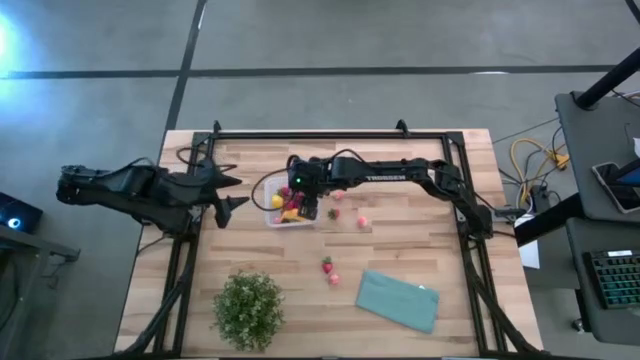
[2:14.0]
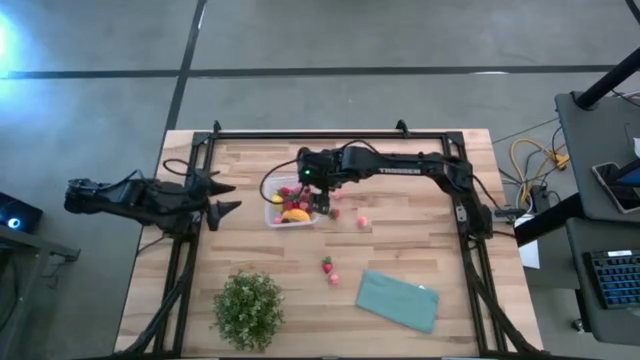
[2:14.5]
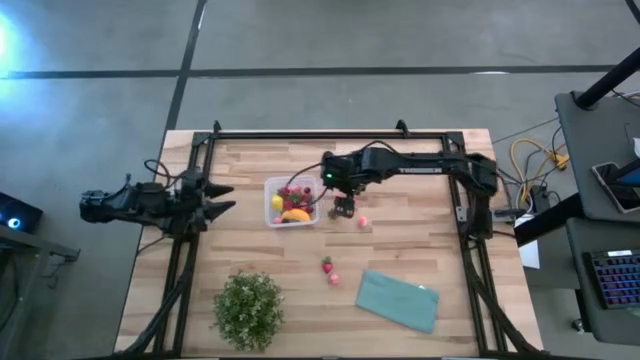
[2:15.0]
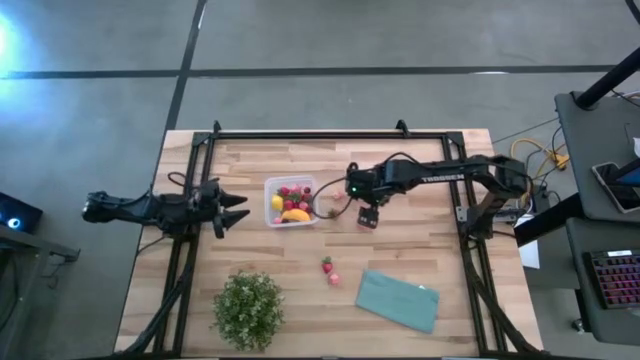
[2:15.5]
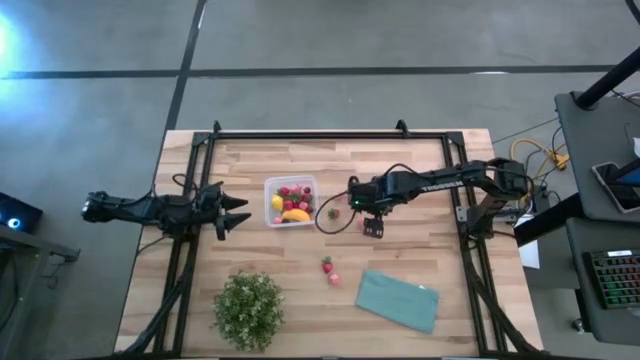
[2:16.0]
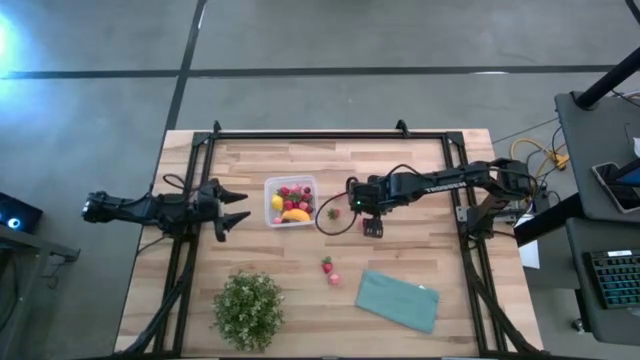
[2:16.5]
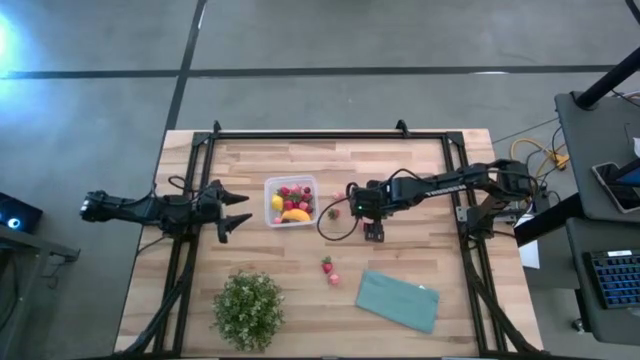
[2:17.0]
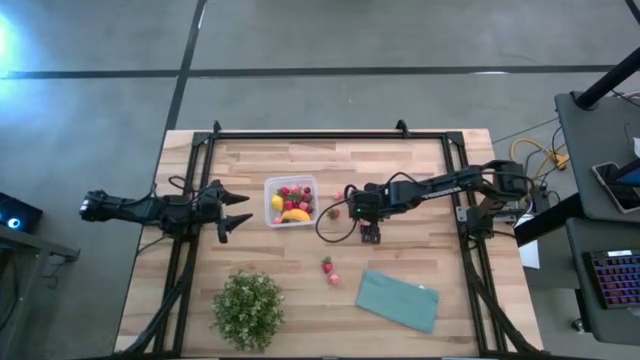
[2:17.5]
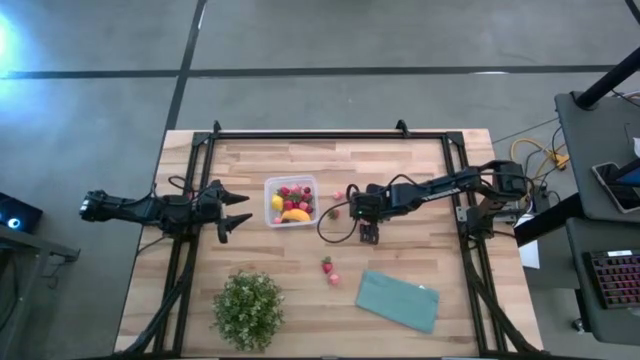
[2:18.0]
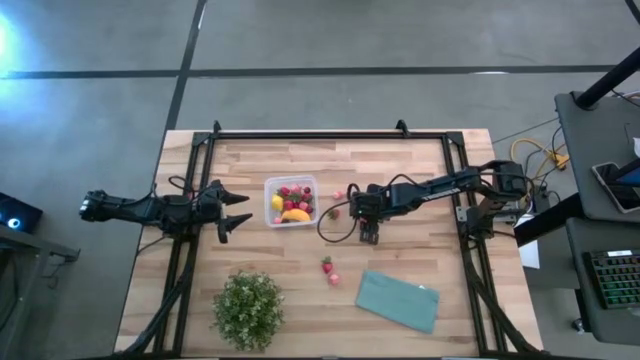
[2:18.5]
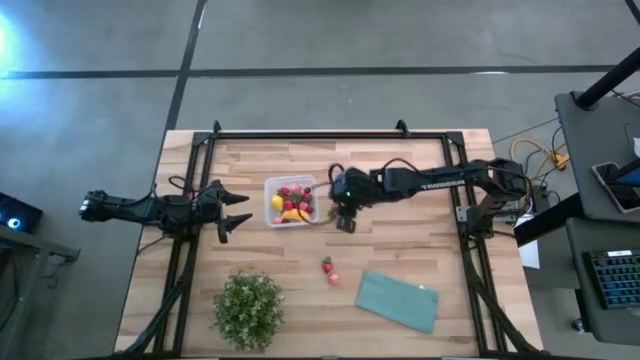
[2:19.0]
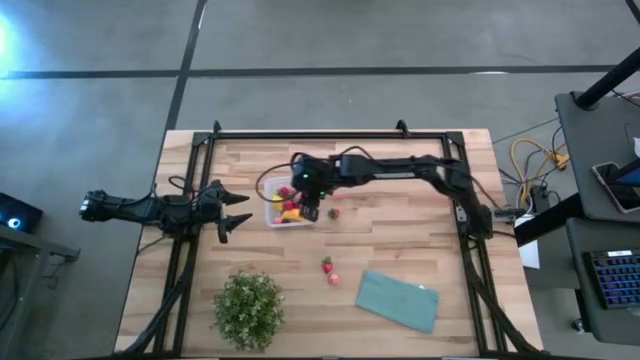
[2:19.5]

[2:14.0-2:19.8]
Task: Pick and placing Produce into tupperware
Put the pink peach into the transparent bin

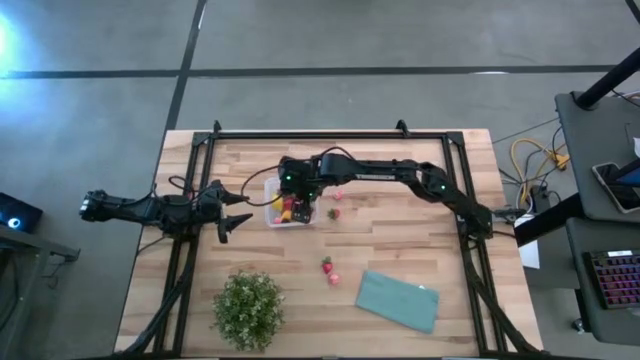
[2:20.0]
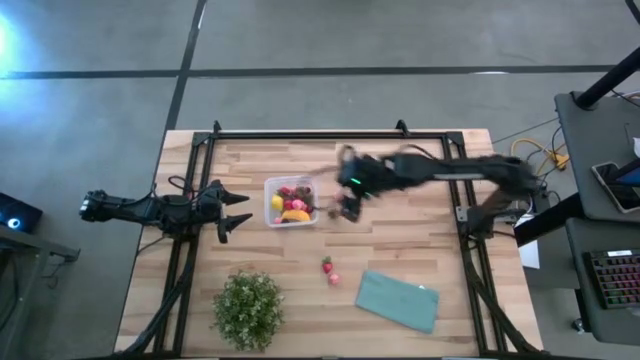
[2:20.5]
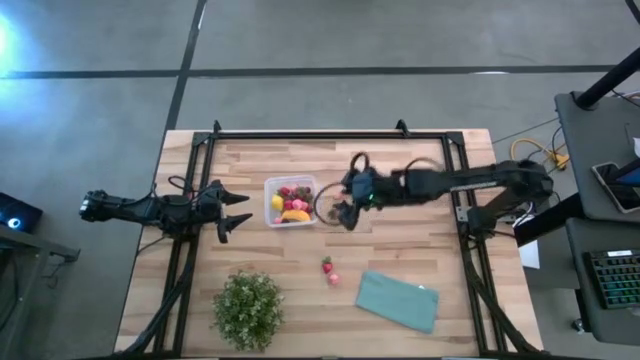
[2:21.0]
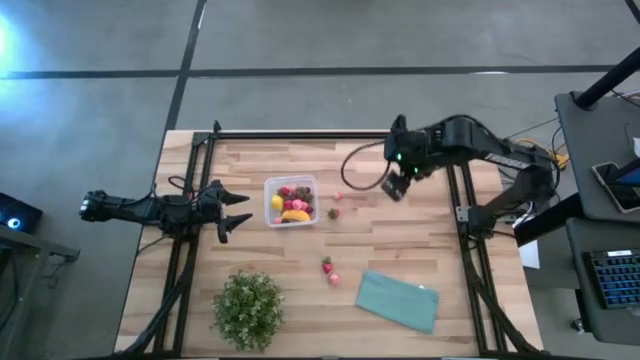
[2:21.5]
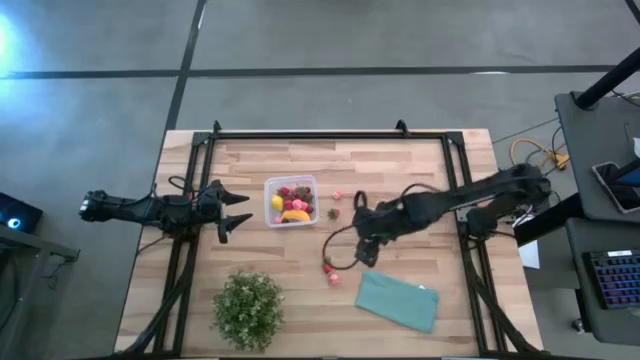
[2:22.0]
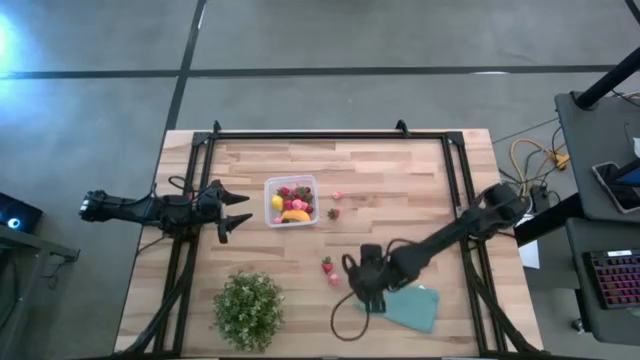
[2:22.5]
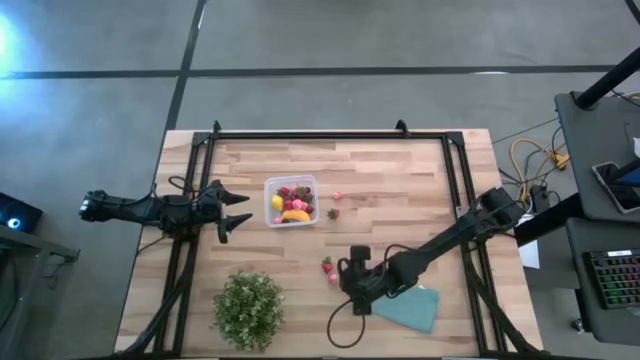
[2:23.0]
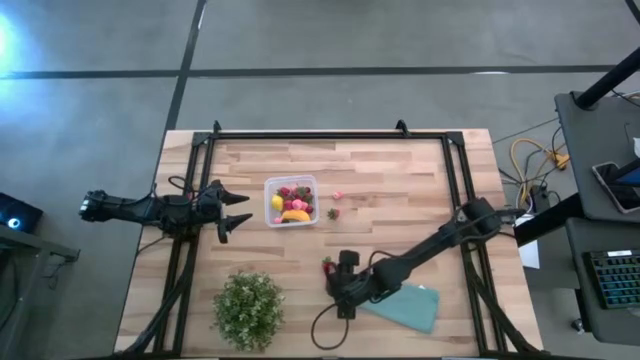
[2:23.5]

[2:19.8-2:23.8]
Put the pink peach into the transparent bin

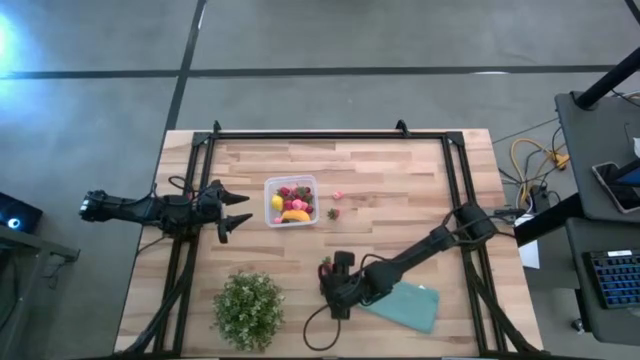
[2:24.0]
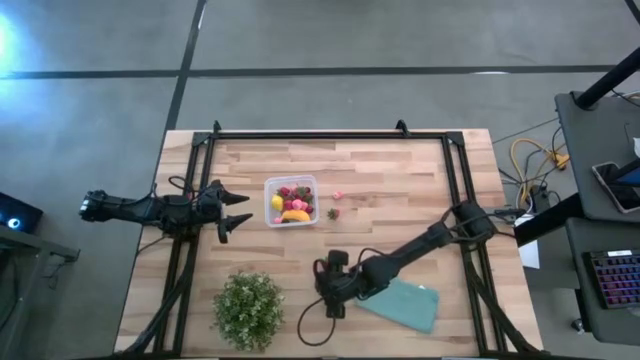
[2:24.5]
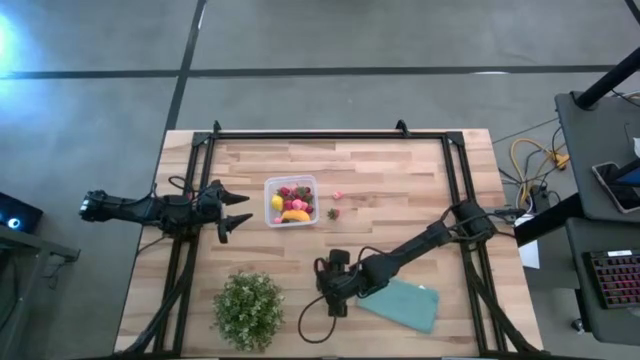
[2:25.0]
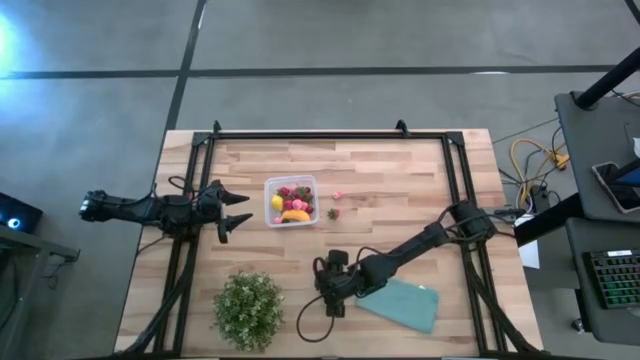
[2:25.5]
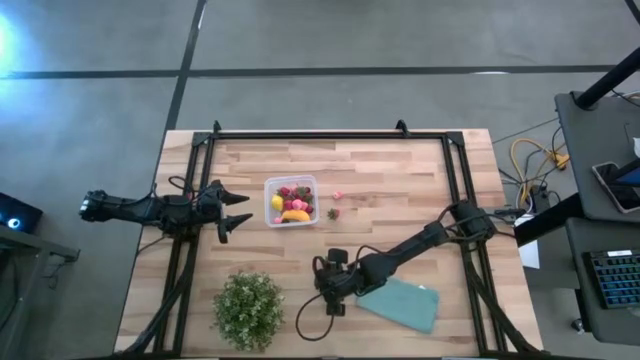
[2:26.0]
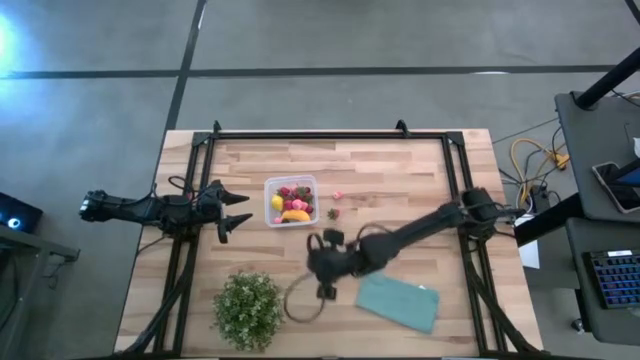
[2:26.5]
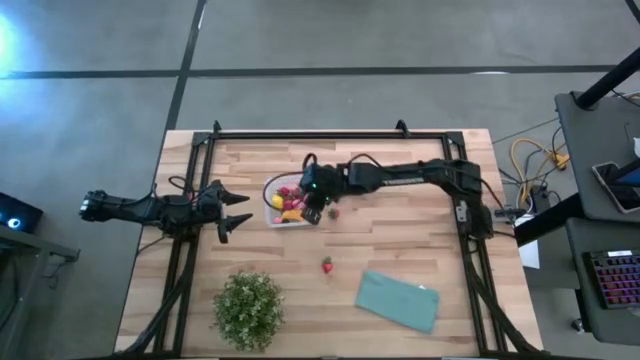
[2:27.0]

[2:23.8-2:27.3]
Put the pink peach into the transparent bin

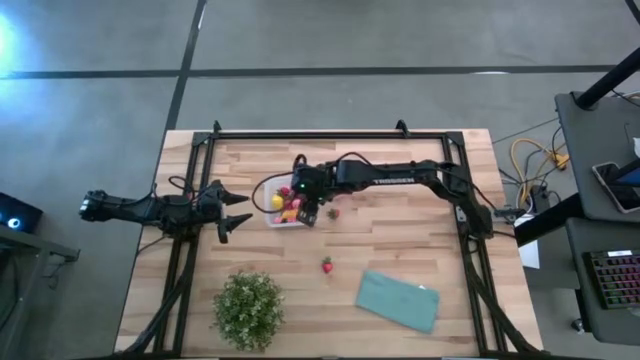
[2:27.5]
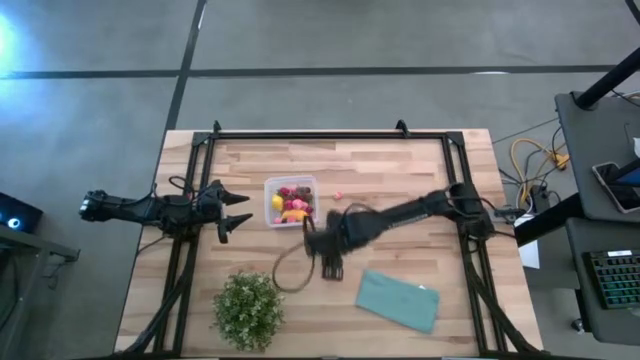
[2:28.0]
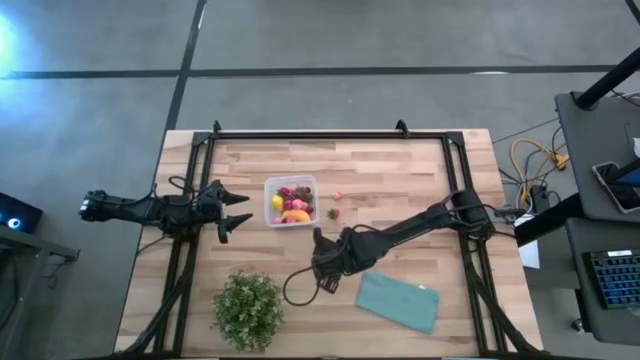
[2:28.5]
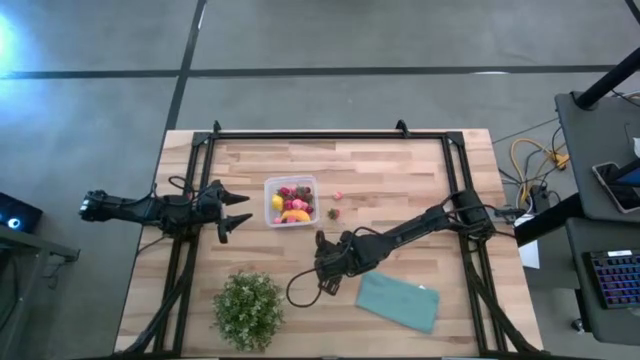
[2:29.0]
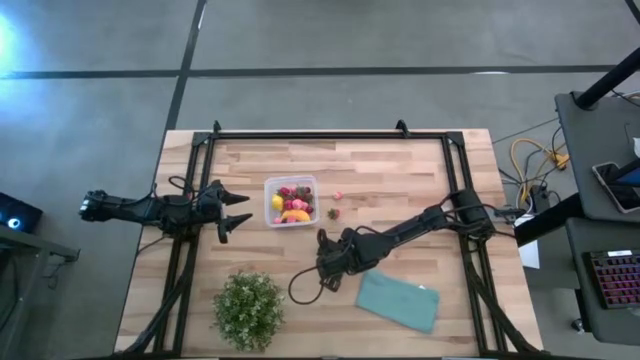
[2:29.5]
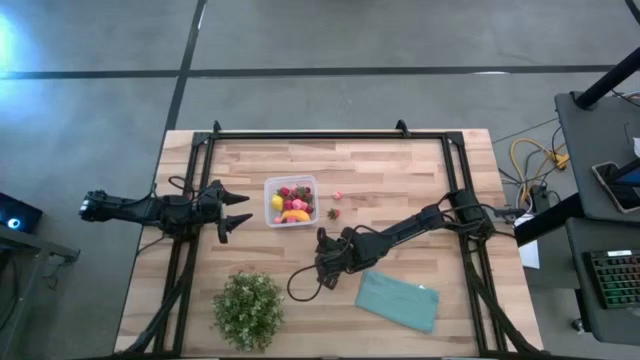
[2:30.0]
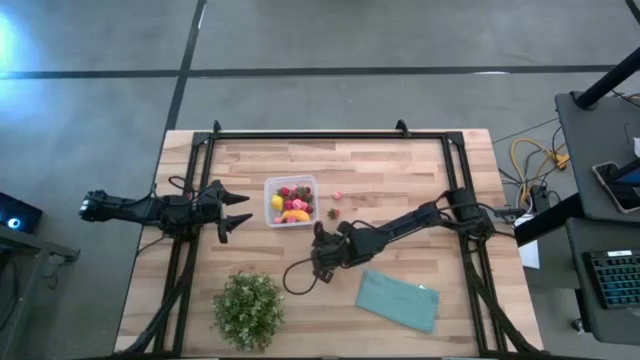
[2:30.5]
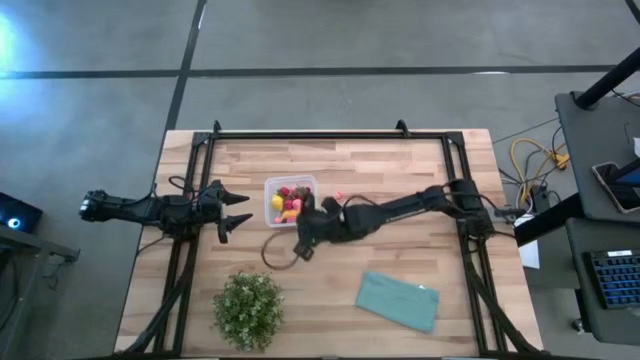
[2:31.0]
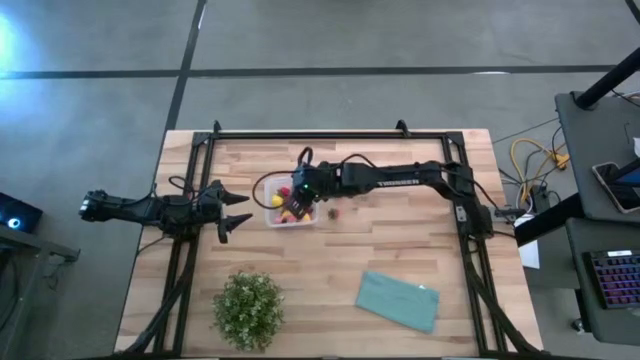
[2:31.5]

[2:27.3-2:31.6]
Put the red strawberry into the transparent bin

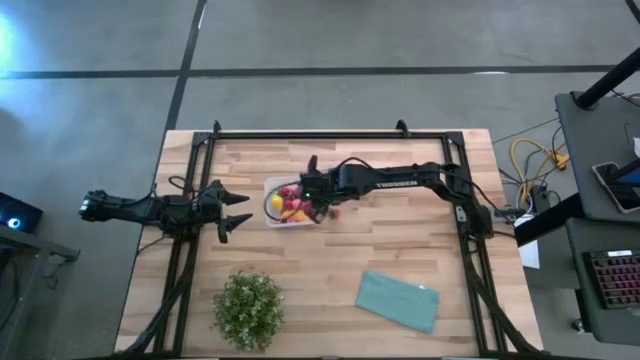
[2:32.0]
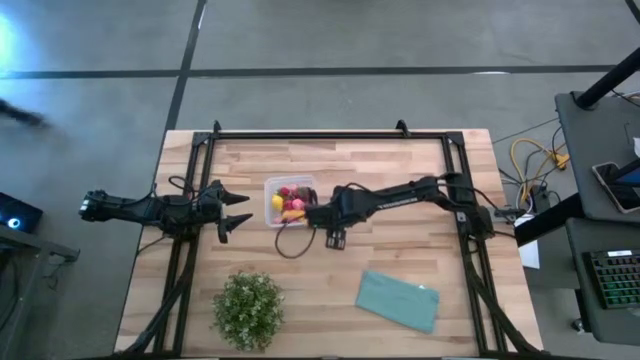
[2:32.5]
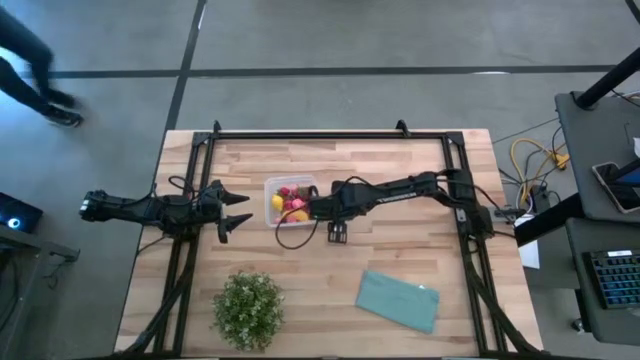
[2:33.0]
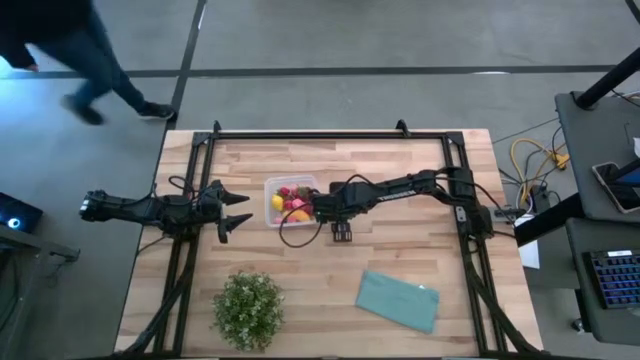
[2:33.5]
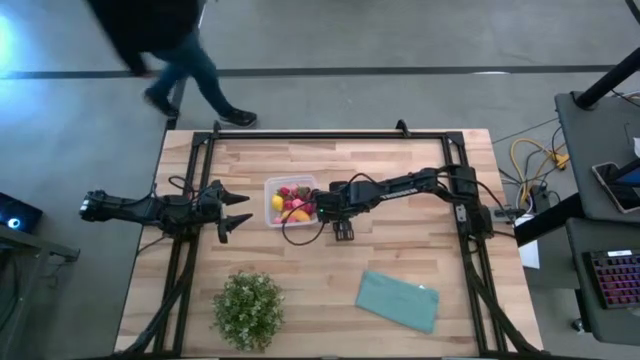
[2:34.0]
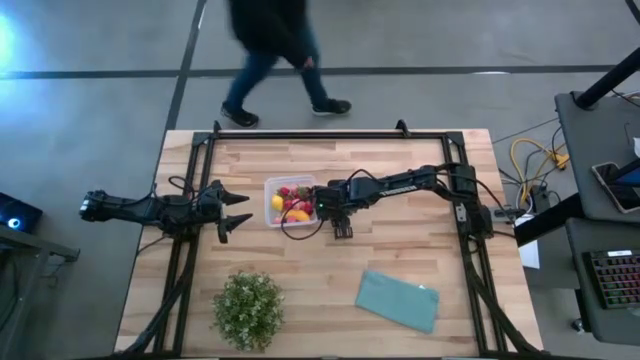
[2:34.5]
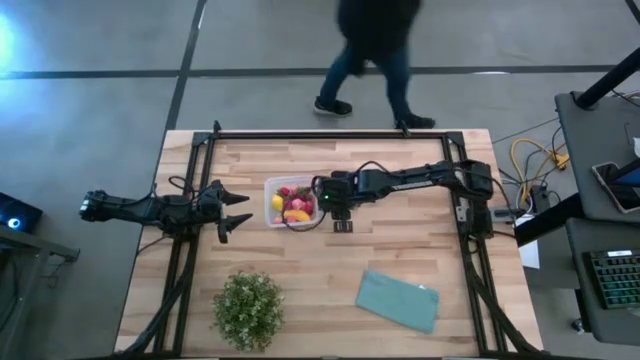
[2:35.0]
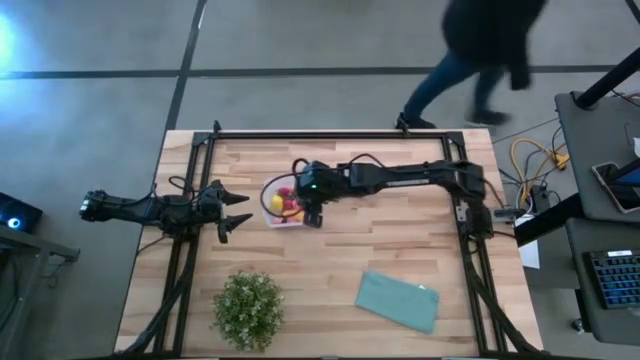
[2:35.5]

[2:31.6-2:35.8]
Put the red strawberry into the transparent bin
